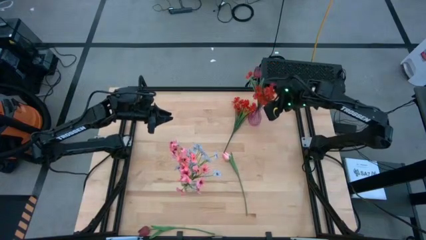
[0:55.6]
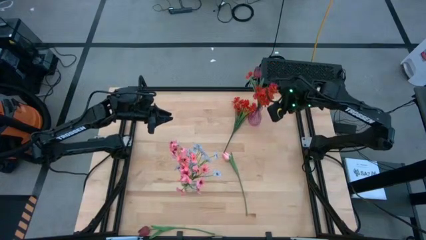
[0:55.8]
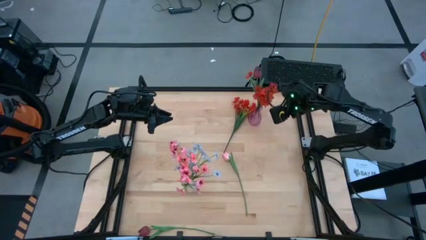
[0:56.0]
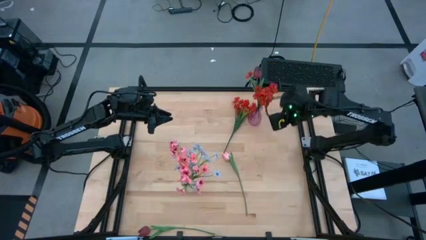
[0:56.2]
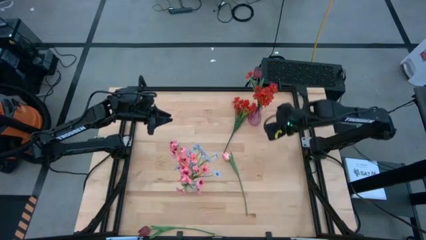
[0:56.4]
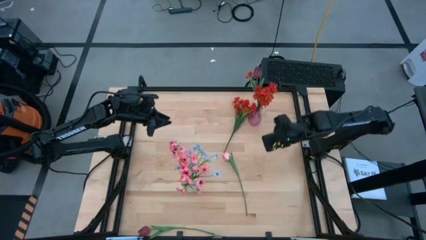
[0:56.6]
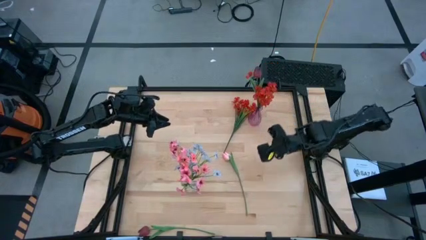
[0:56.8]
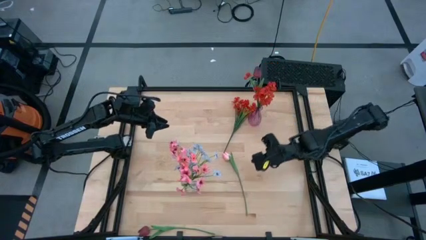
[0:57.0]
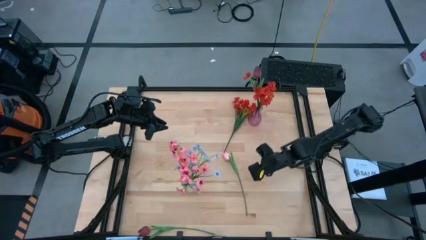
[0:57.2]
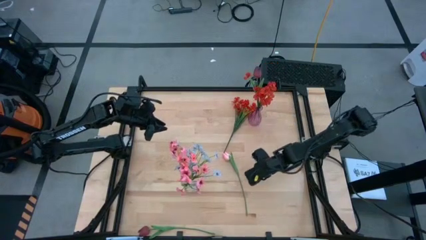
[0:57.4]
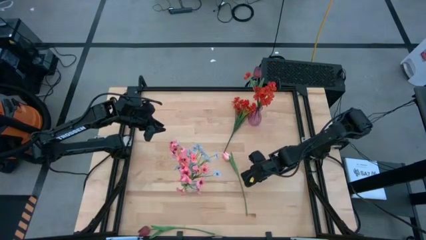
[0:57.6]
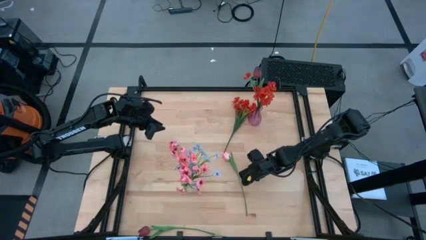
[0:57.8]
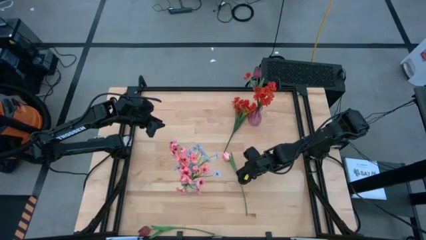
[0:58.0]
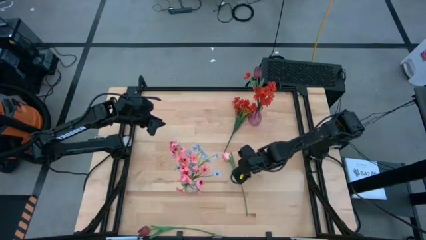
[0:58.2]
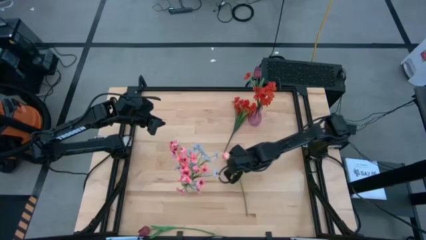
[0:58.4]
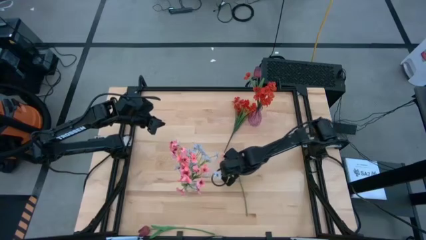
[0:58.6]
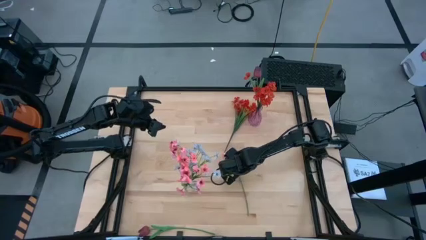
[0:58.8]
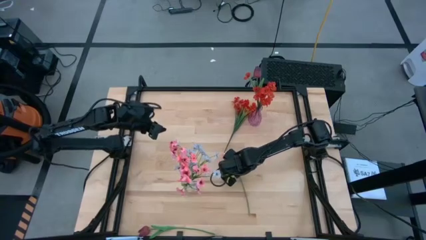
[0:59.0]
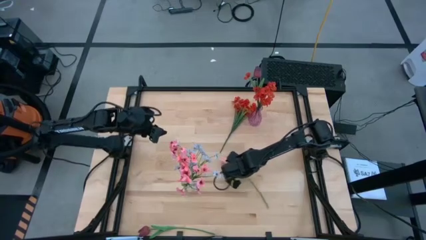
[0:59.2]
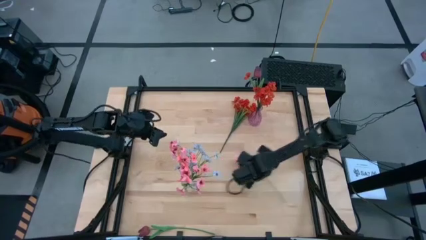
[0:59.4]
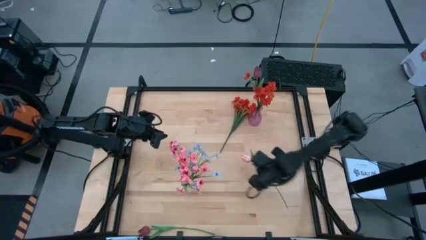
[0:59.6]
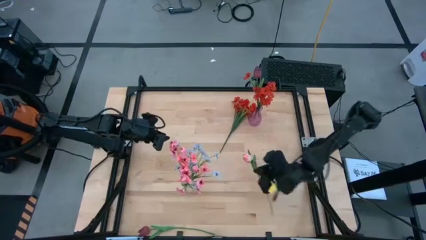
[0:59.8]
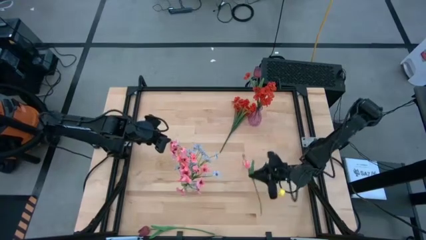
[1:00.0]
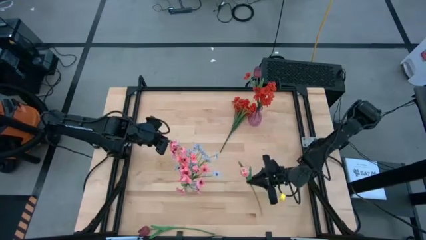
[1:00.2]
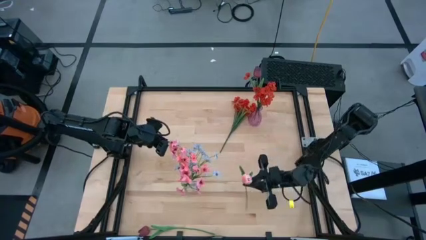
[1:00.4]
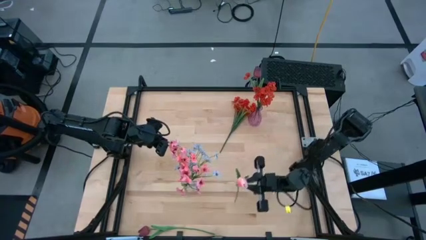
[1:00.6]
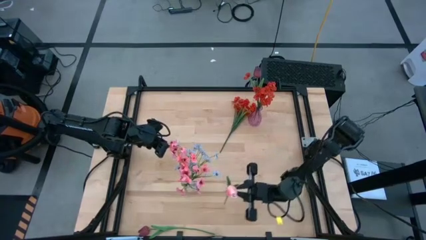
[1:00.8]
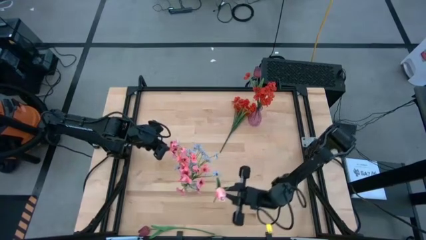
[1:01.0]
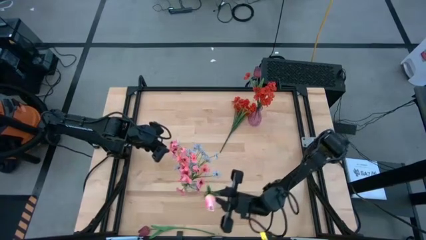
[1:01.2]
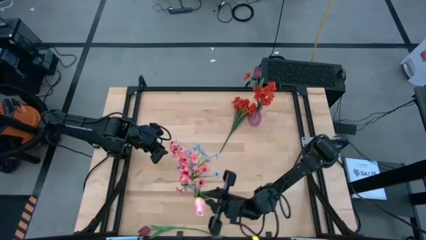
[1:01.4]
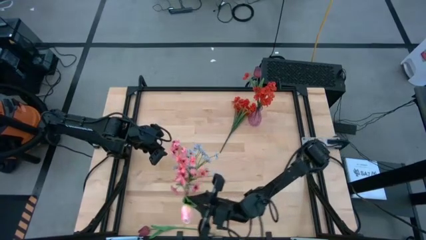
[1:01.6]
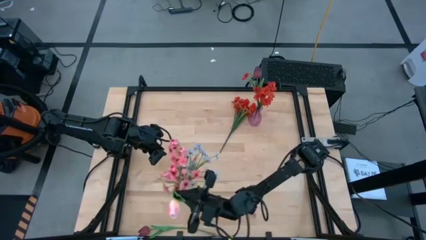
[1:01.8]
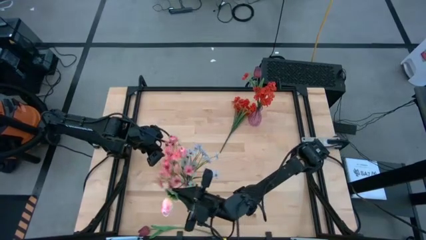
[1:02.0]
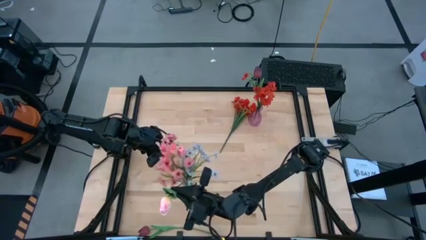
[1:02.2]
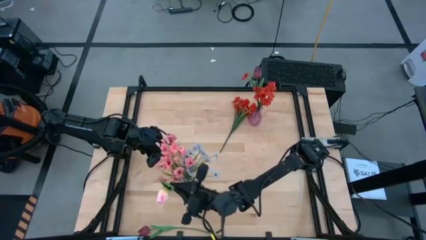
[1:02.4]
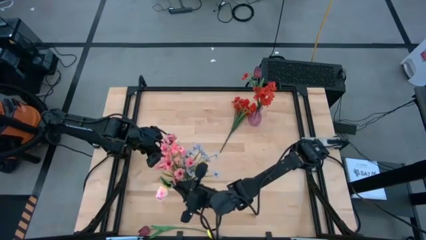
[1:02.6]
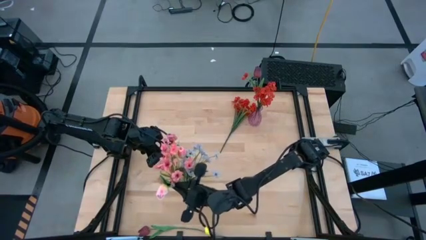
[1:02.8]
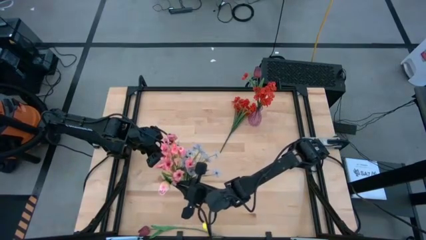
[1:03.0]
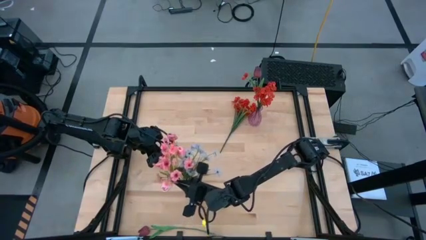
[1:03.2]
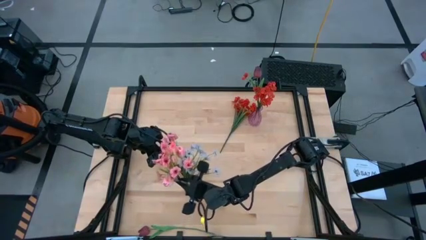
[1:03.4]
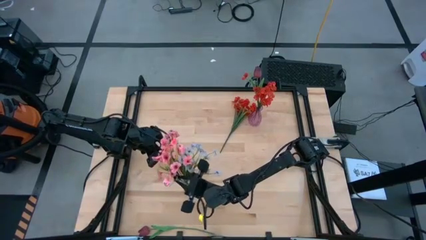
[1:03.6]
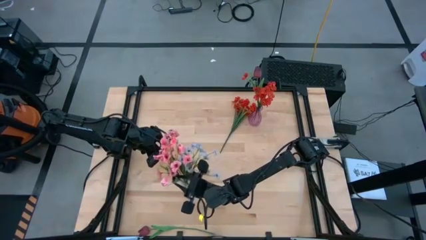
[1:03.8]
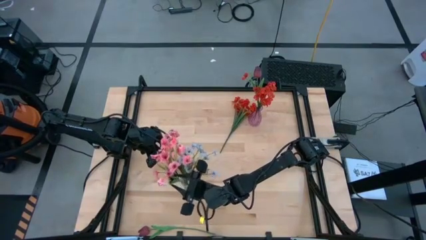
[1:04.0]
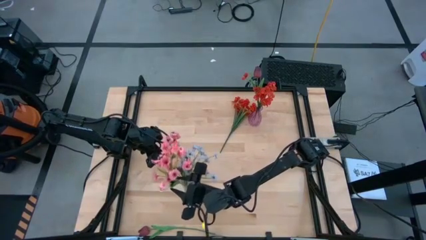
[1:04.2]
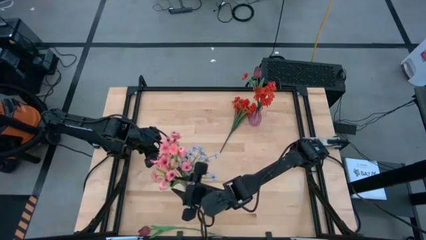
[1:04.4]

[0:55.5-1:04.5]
Task: Sort flowers into vase by color
Put the pink flower into the transparent vase

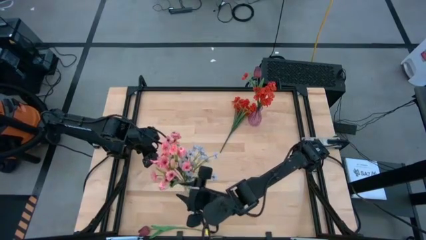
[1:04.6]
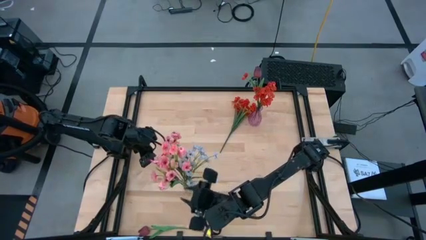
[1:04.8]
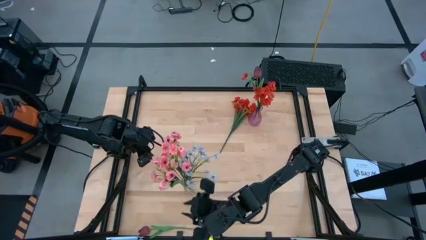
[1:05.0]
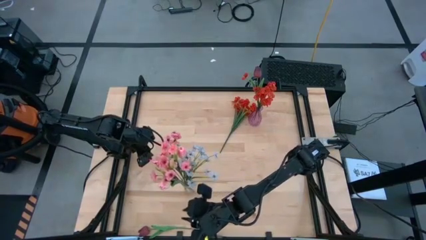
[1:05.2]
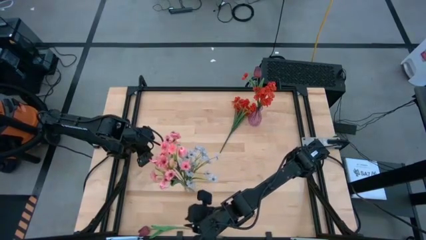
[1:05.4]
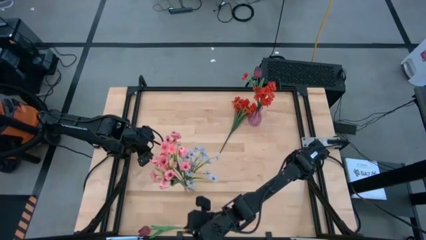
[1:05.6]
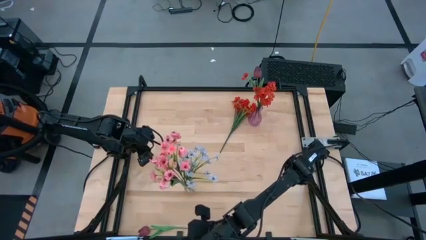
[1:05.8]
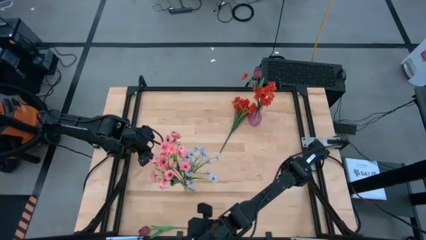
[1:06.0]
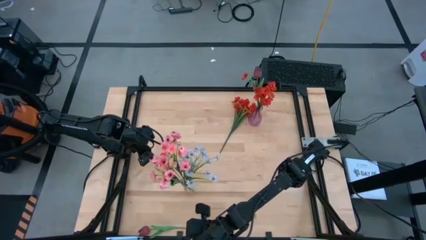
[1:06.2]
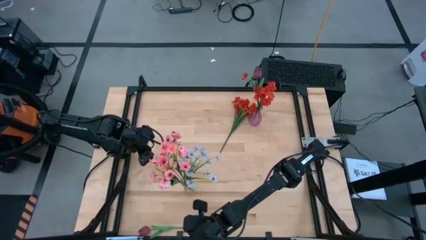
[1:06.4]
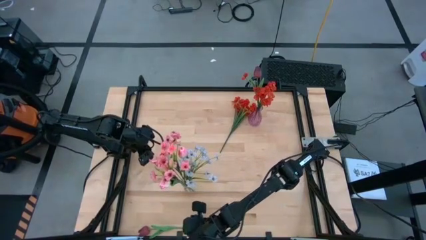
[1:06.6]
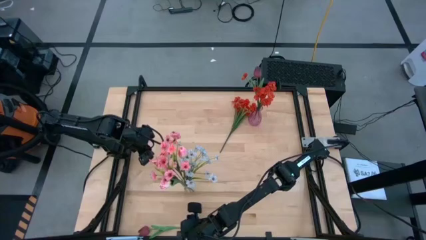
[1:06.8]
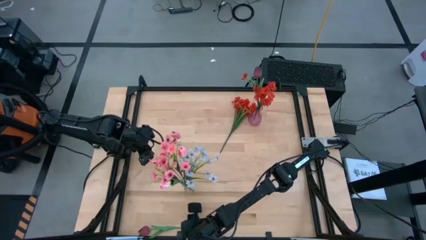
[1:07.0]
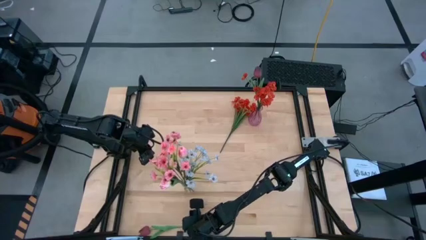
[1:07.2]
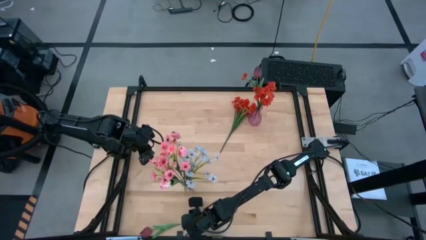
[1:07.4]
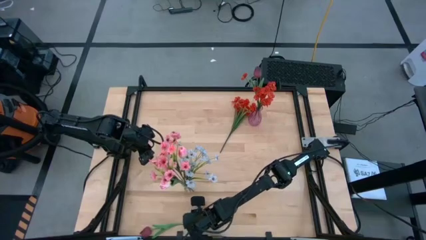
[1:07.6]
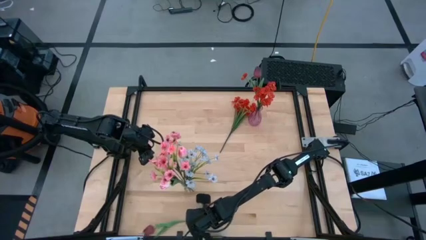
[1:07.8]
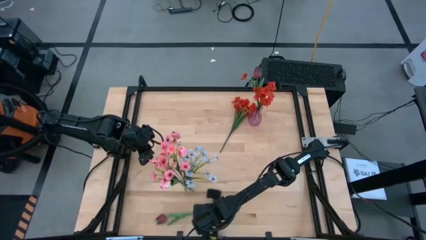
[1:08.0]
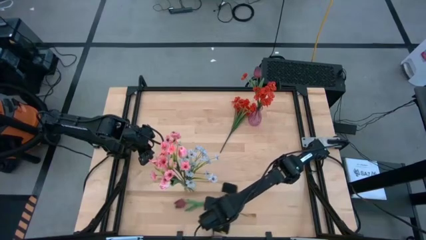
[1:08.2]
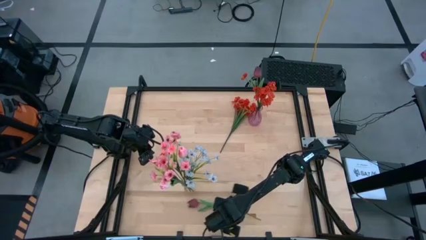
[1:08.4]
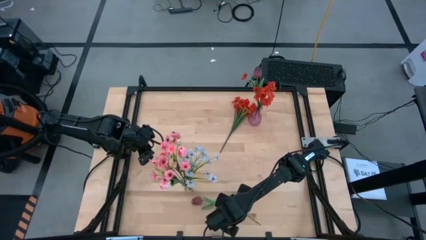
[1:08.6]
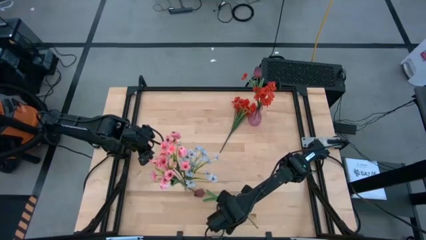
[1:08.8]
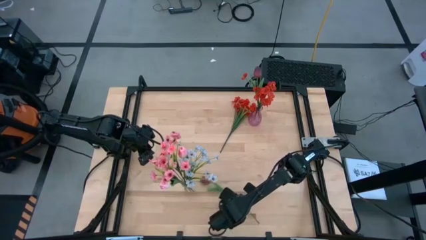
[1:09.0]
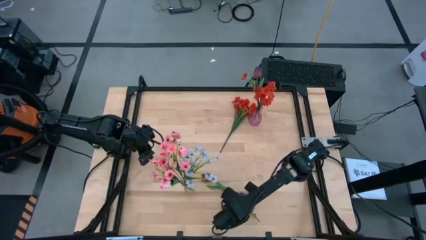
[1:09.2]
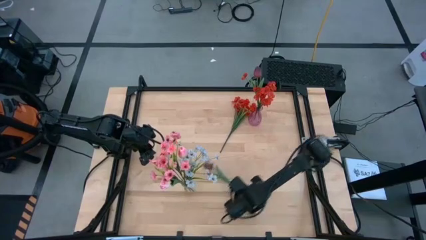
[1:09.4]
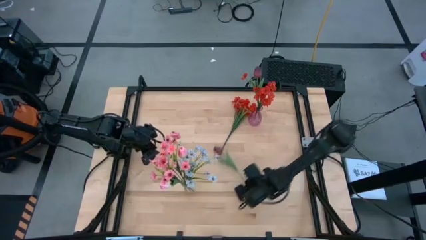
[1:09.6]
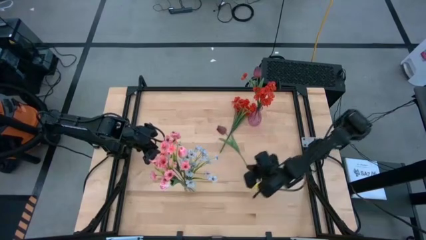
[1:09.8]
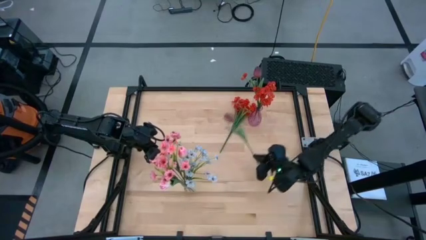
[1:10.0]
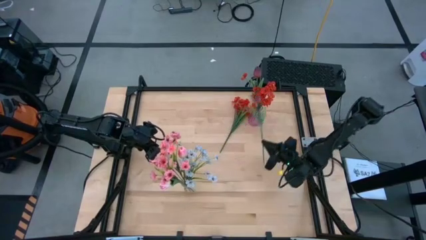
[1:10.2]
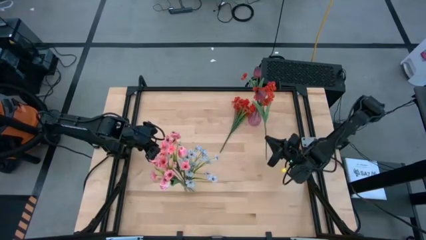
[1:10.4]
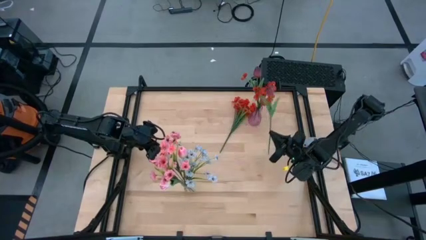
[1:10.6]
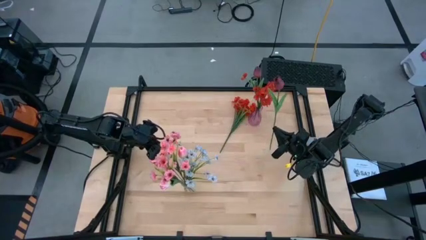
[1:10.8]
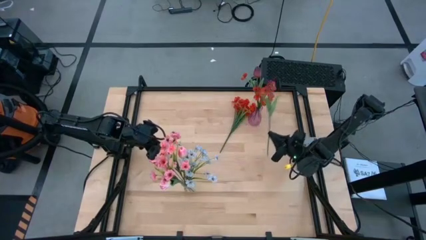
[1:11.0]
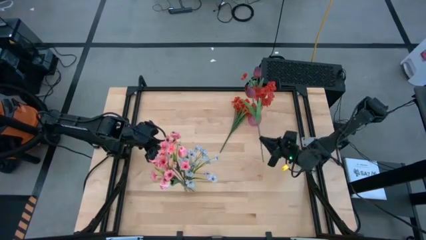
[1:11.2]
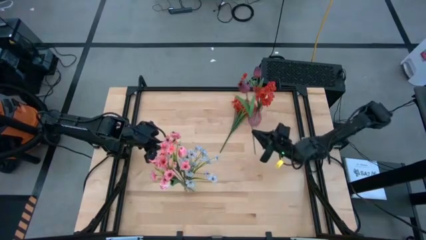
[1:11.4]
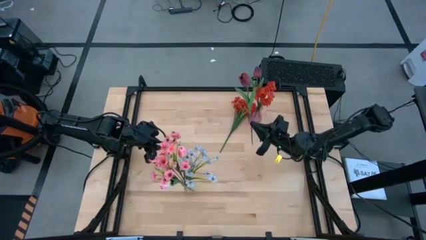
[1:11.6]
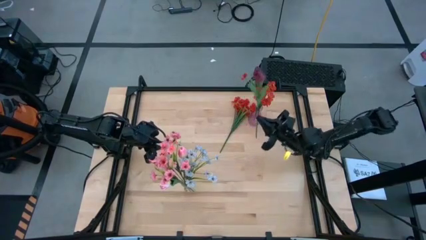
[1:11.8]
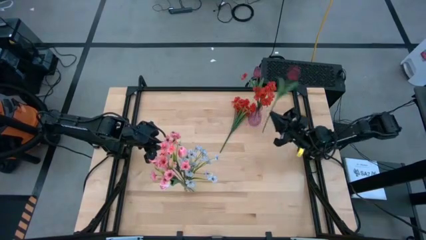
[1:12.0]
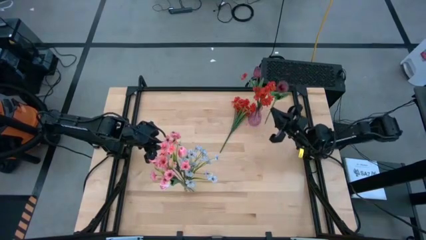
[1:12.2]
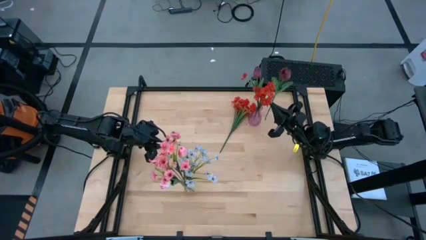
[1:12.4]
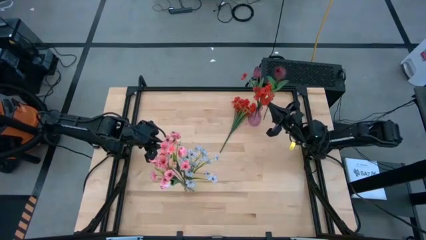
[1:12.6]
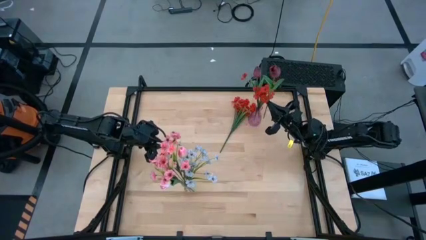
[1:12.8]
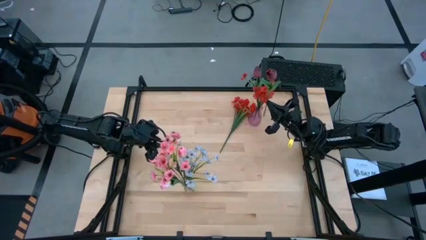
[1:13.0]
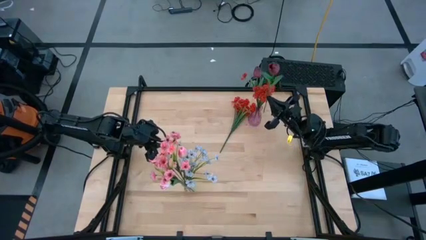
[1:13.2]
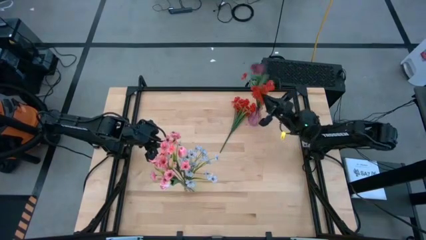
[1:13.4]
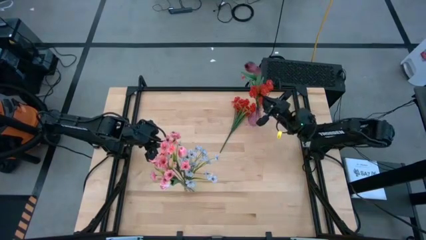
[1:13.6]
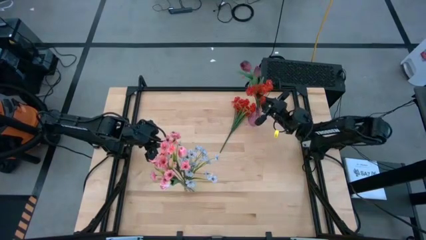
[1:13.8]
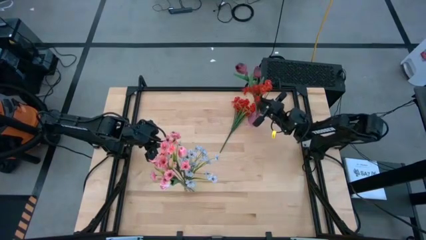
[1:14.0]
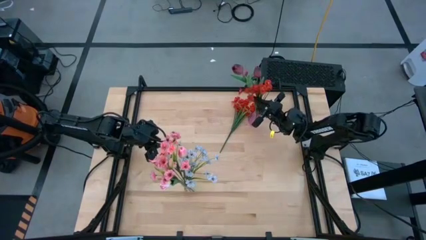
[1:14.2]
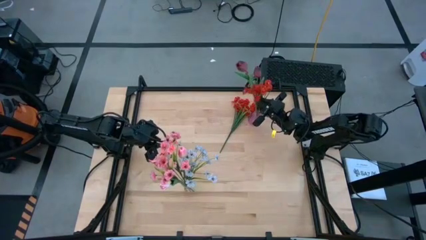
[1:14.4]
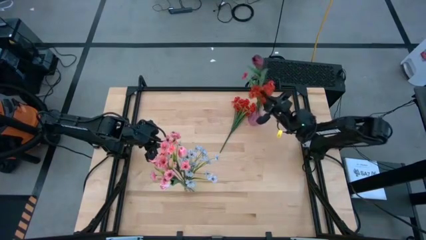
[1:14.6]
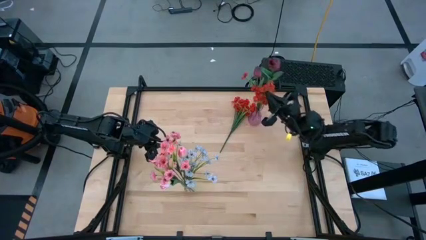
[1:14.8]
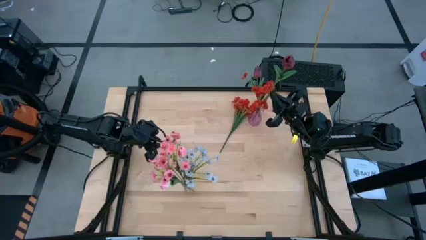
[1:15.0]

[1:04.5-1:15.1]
Put the red flower into the purple vase
